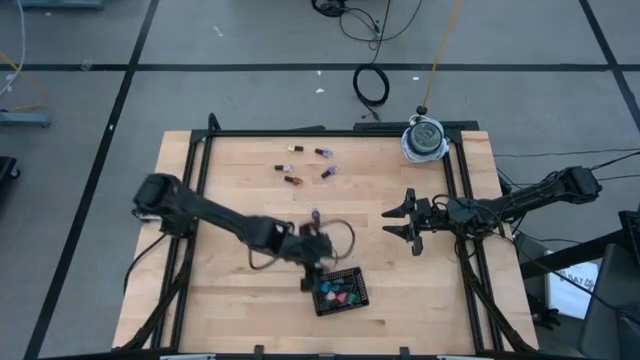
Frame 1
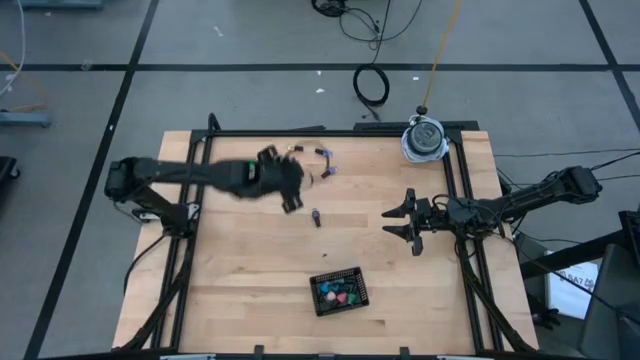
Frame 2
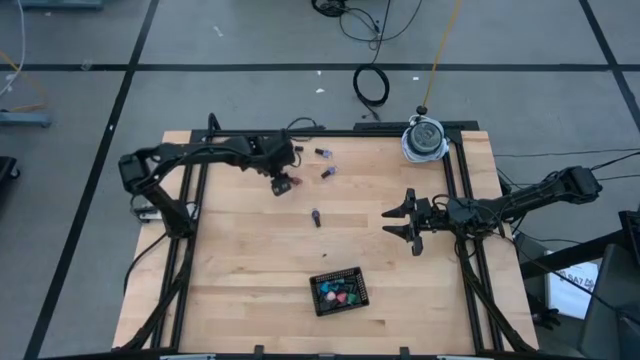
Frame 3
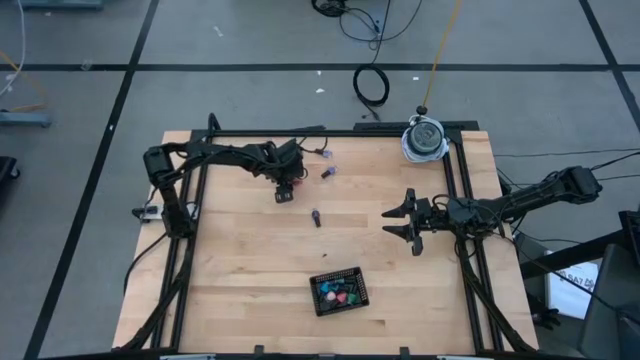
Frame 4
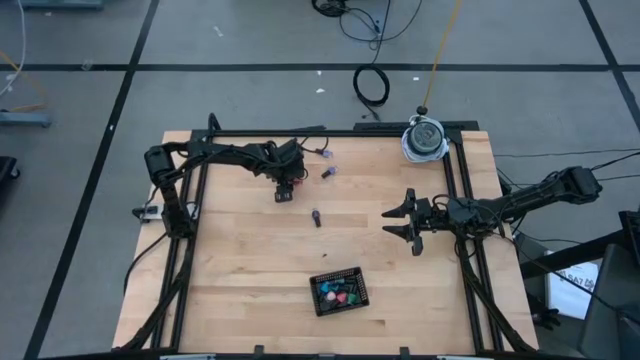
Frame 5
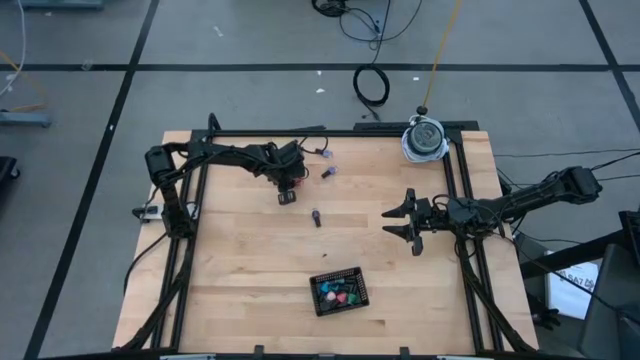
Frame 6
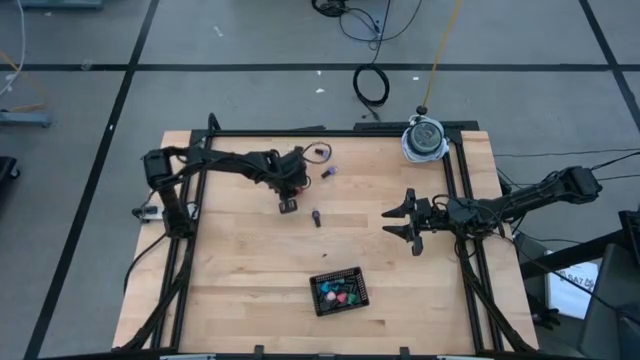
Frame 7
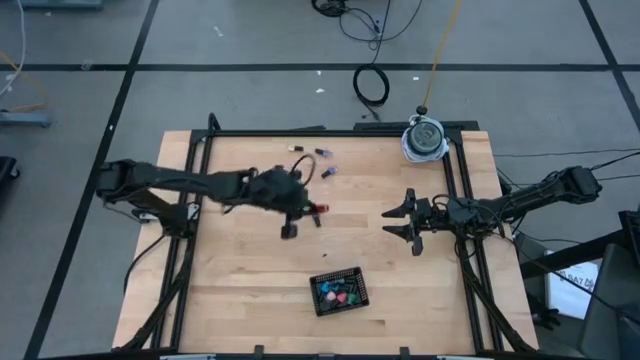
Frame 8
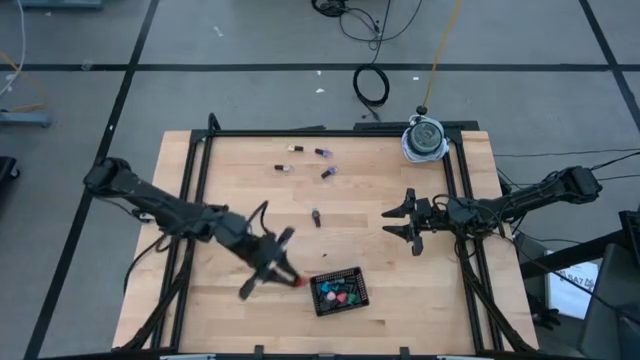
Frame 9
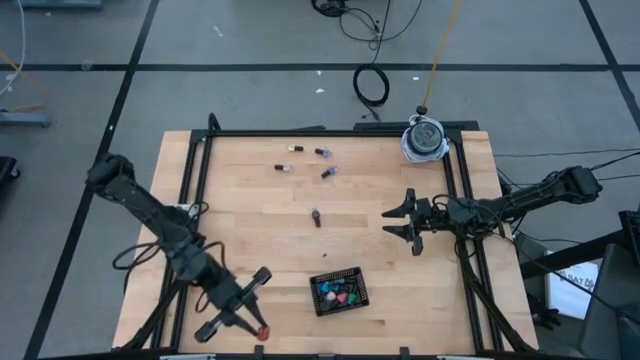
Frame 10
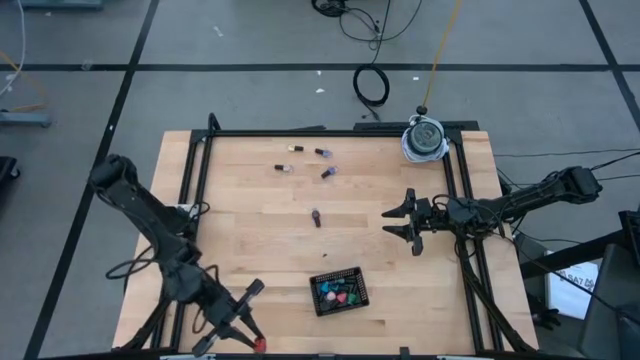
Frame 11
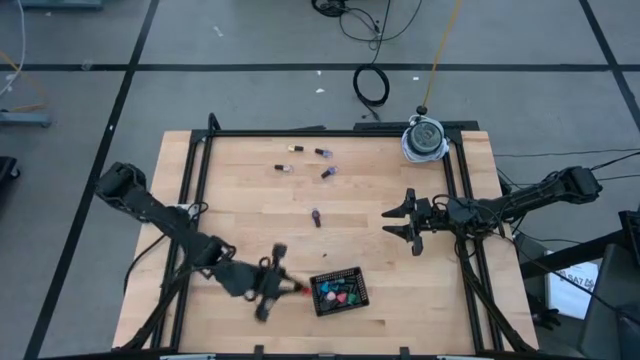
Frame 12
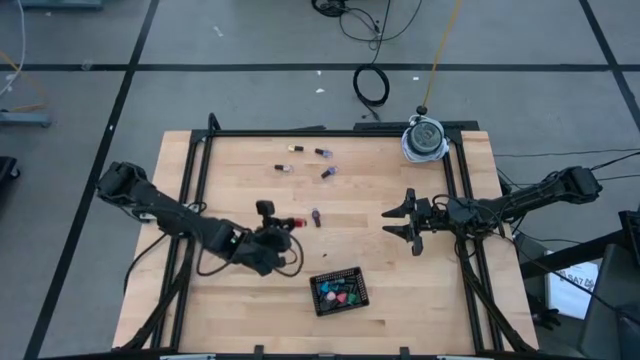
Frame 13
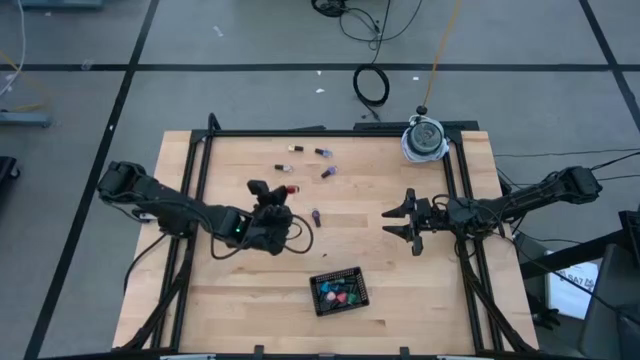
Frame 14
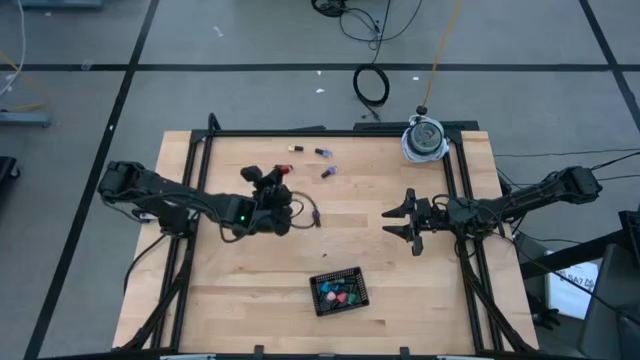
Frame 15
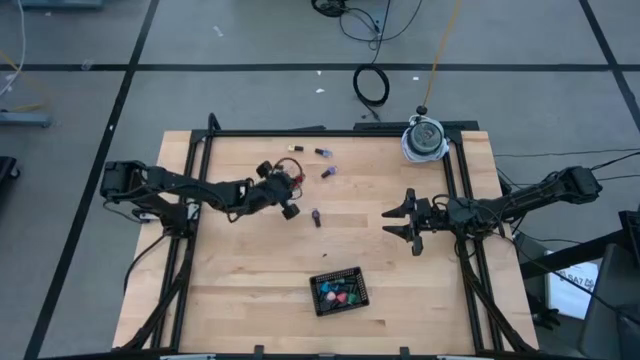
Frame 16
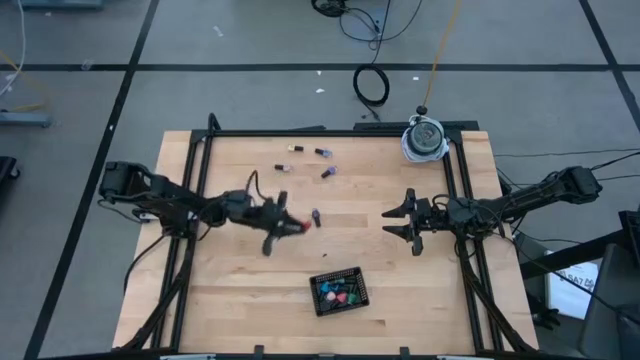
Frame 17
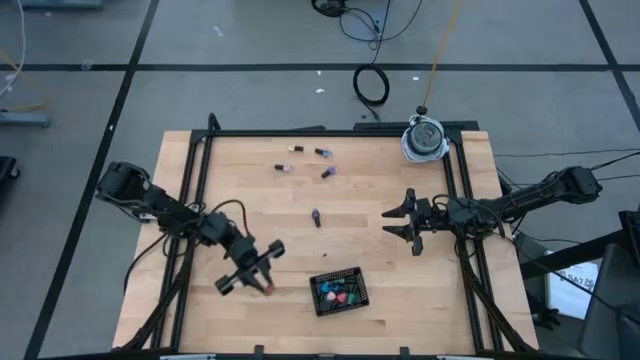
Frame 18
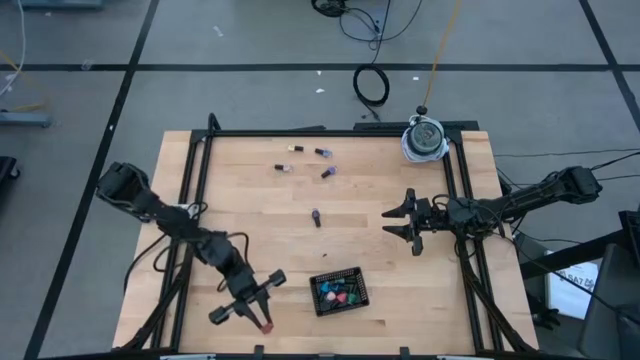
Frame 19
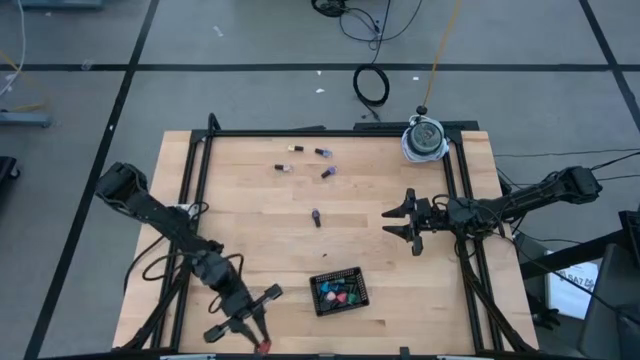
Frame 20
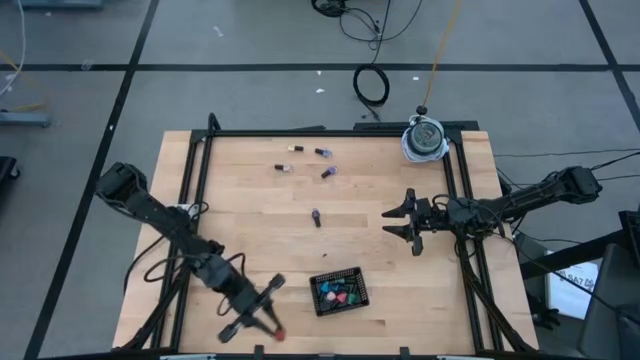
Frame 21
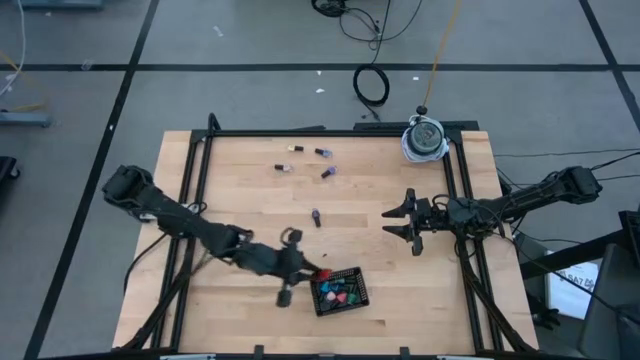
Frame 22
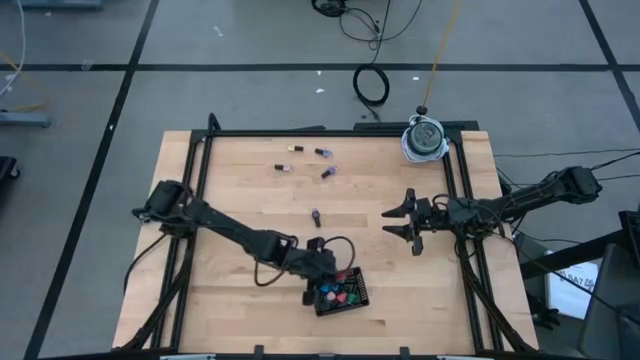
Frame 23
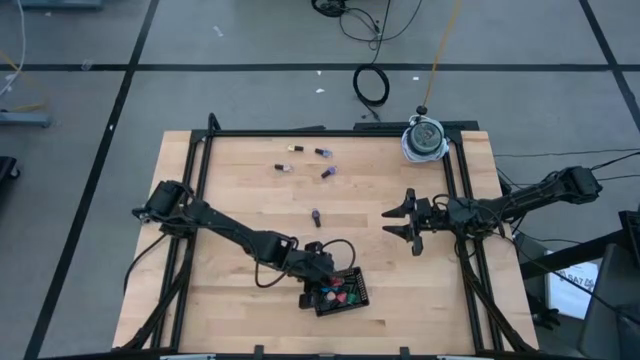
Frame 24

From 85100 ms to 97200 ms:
Task: Pick & Place Nail Polish
Put the red nail polish bottle into the black bin

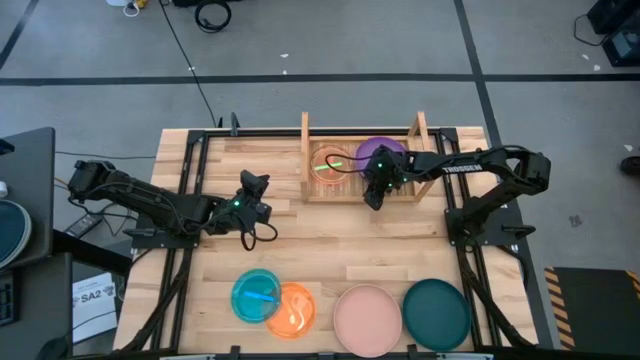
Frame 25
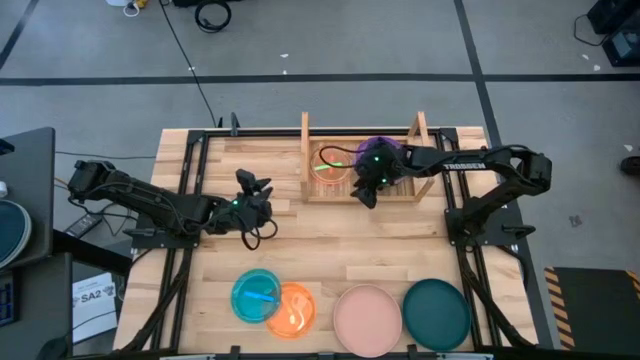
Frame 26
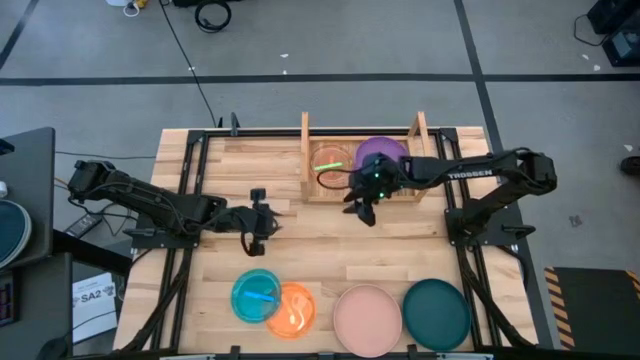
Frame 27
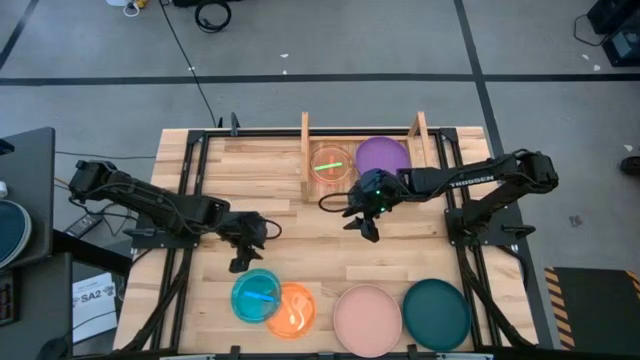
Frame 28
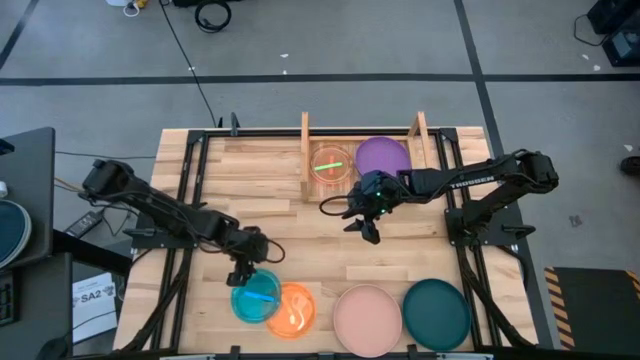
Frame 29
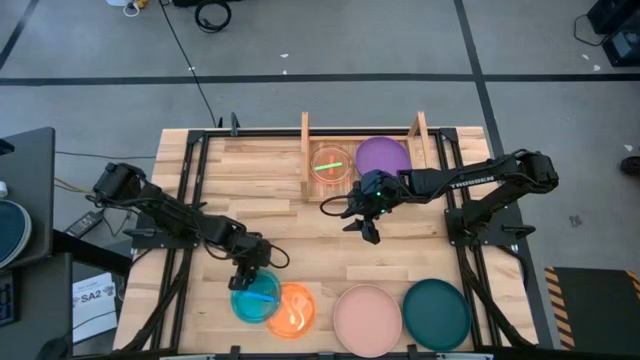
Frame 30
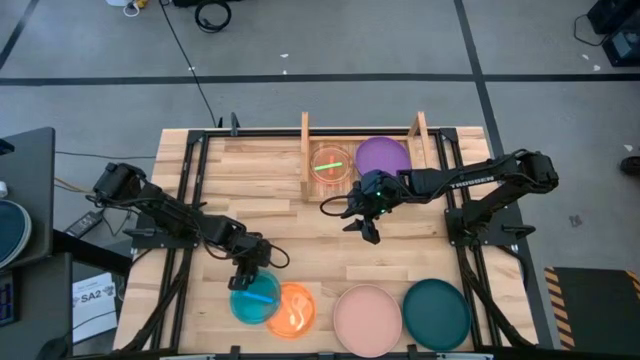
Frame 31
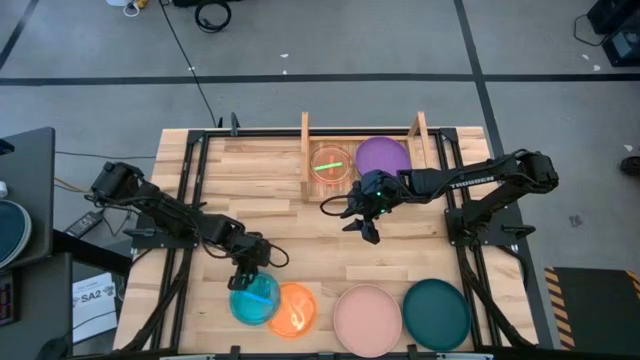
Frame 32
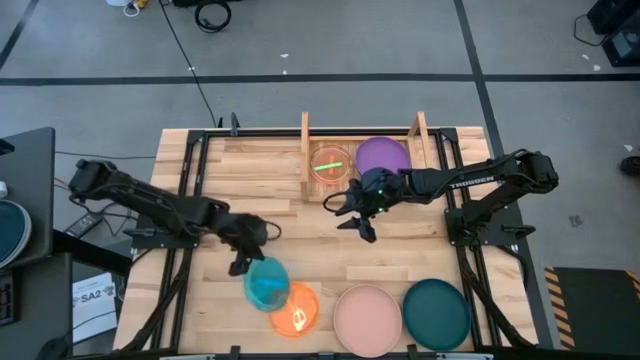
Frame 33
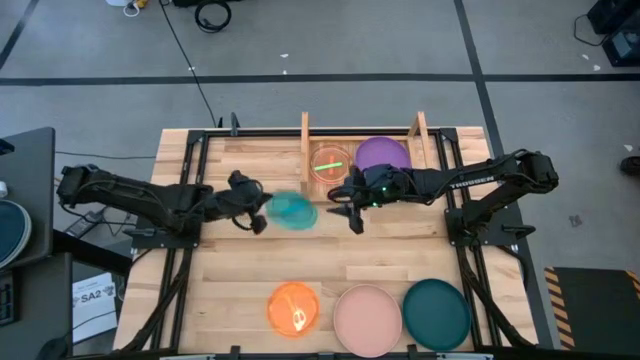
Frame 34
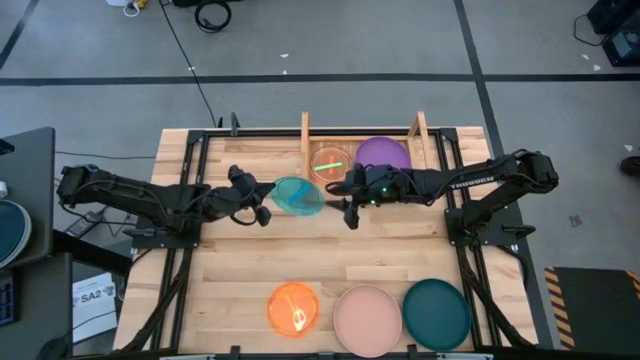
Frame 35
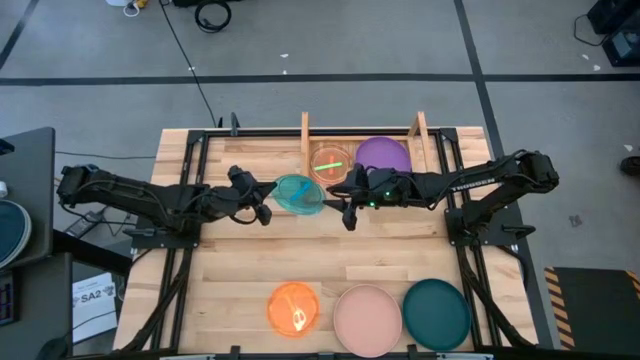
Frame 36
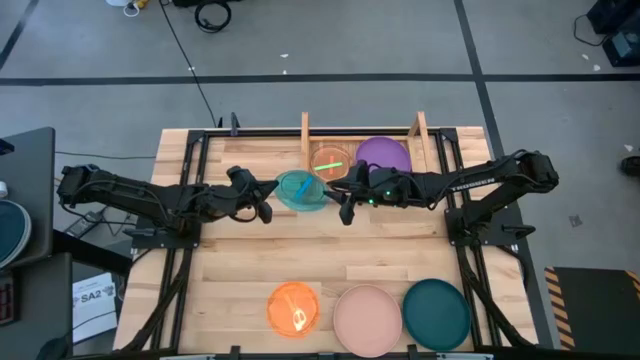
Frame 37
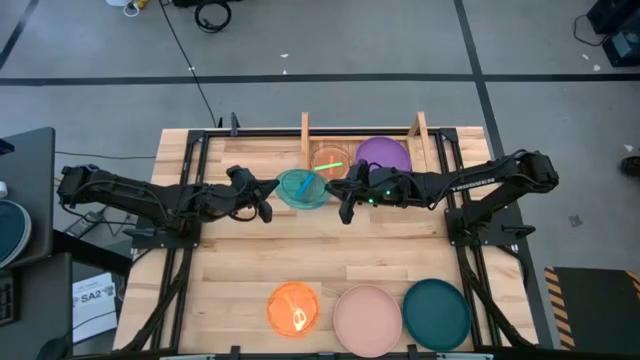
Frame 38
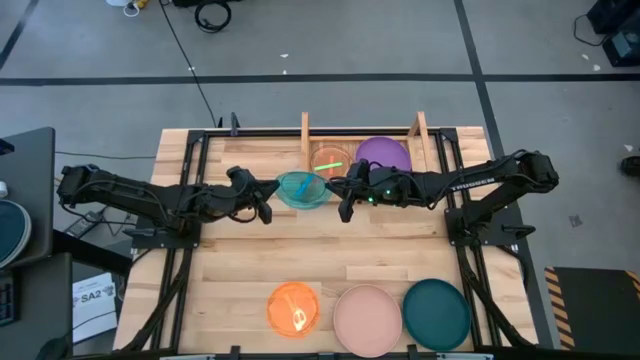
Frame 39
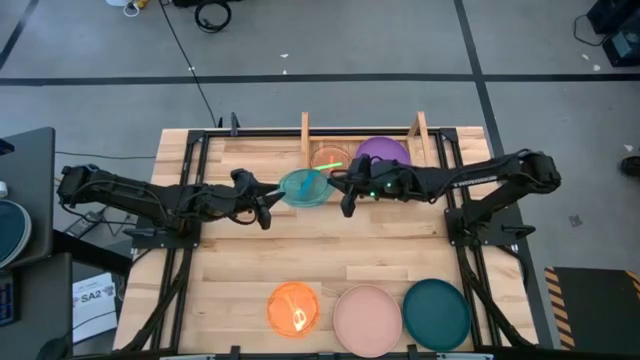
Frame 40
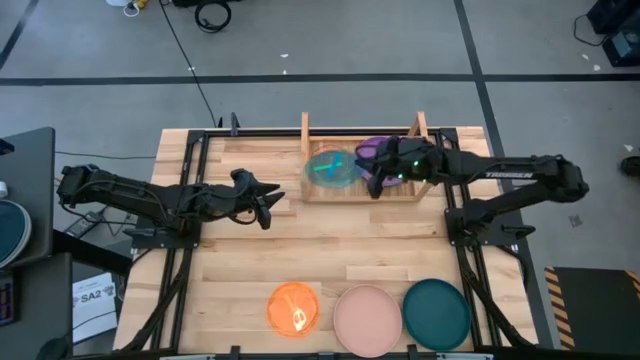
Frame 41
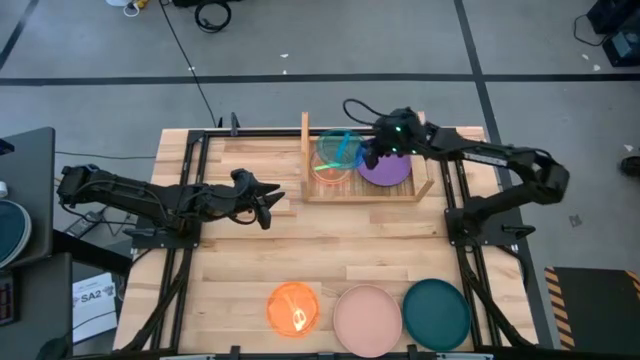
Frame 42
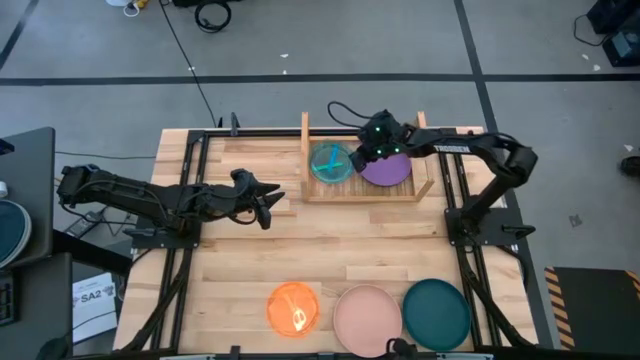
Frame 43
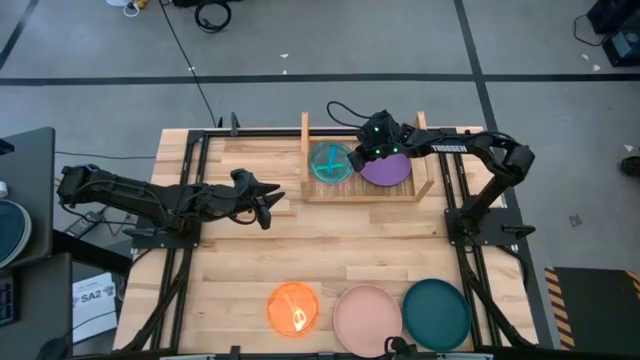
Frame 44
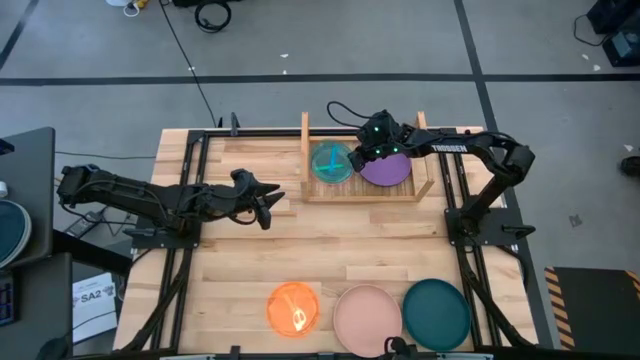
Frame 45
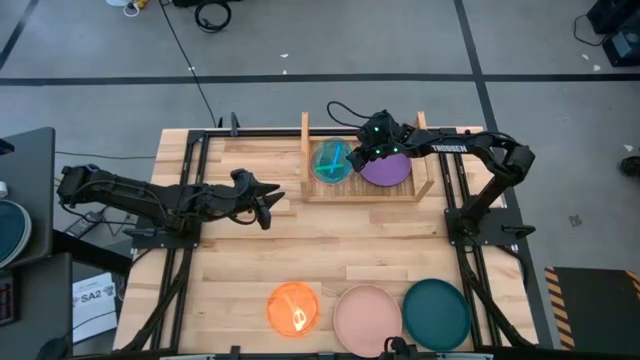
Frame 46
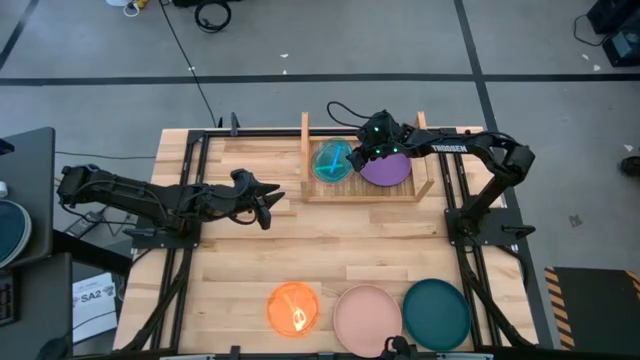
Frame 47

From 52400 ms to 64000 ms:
Task: Place and stack plates onto a shelf
Stack the small blue plate on top of the small green plate on the shelf
